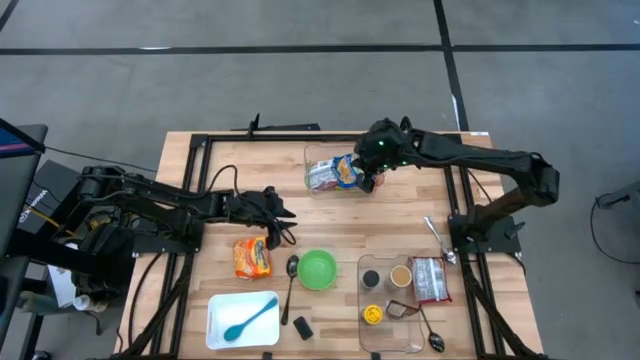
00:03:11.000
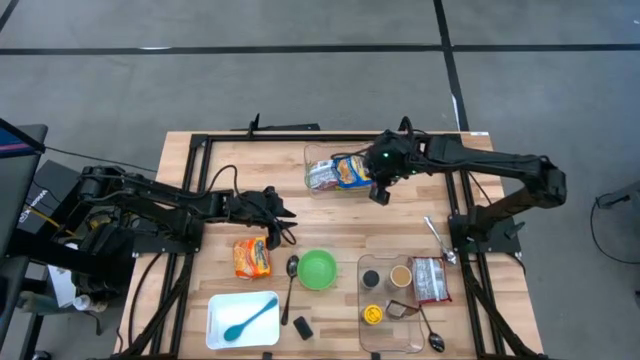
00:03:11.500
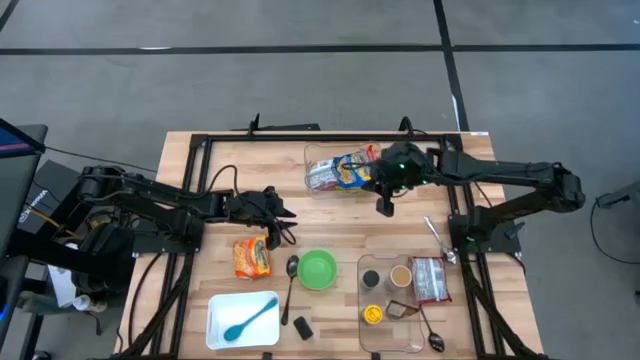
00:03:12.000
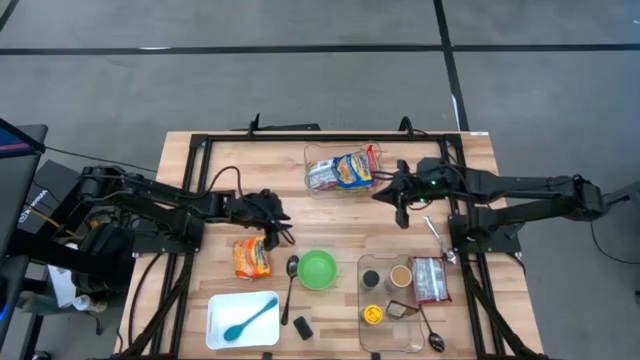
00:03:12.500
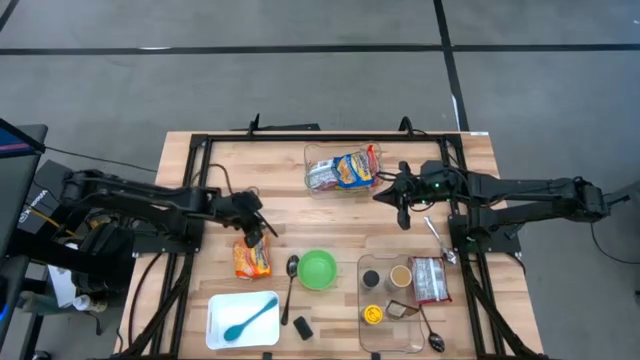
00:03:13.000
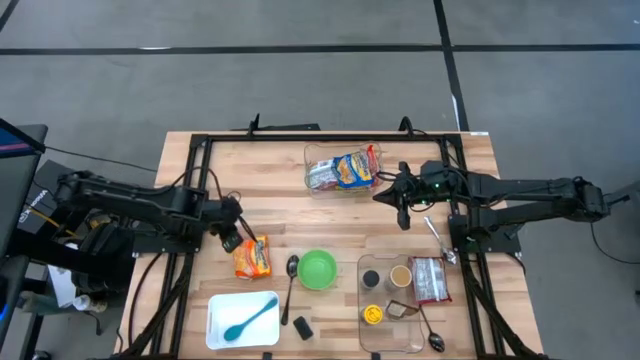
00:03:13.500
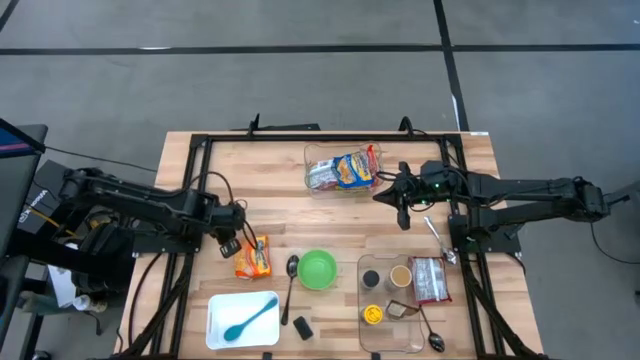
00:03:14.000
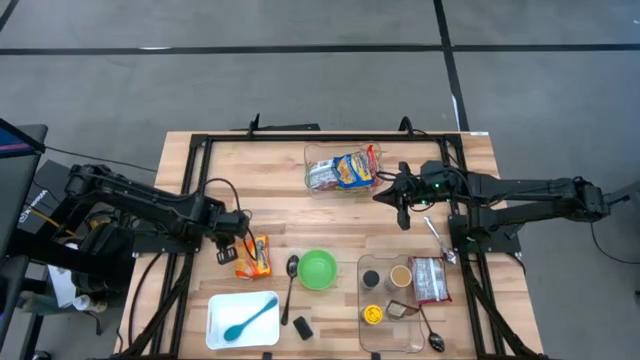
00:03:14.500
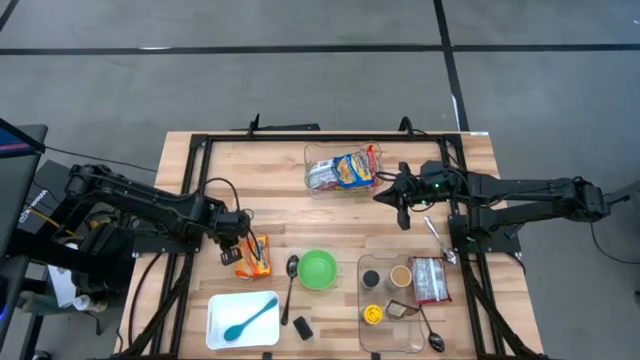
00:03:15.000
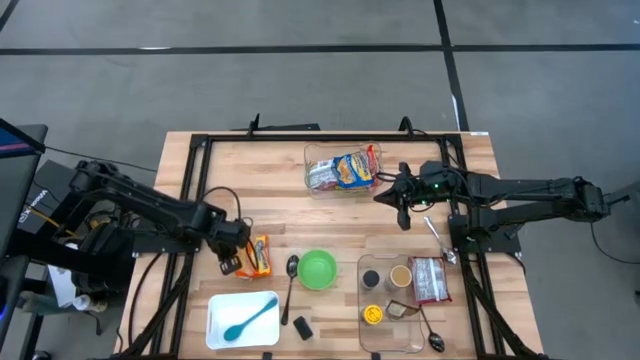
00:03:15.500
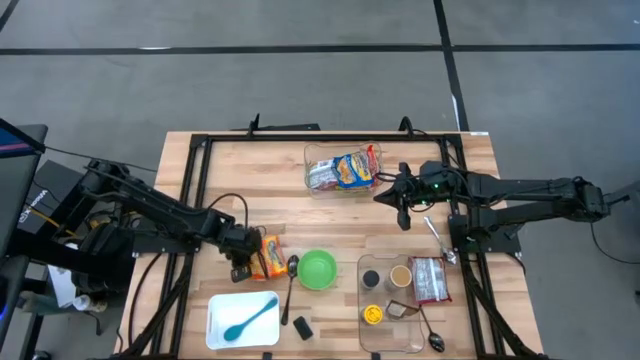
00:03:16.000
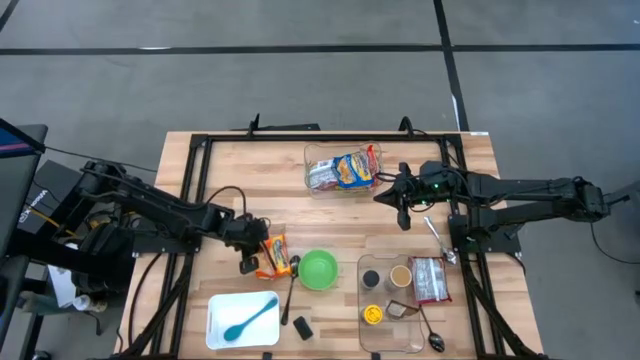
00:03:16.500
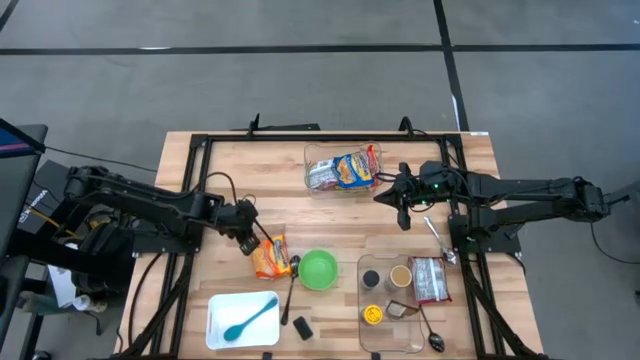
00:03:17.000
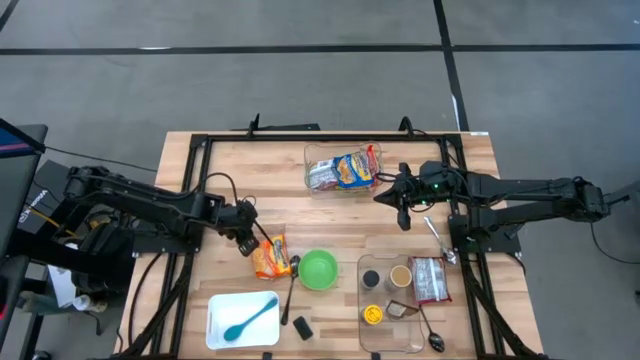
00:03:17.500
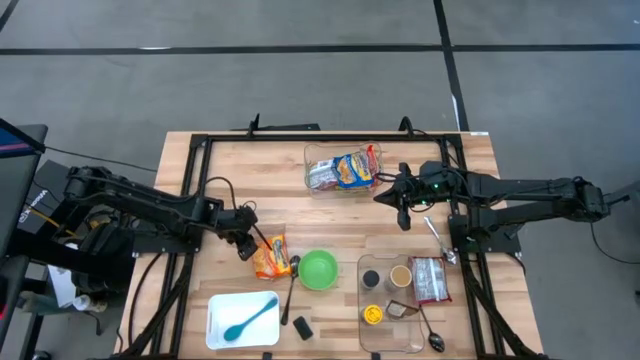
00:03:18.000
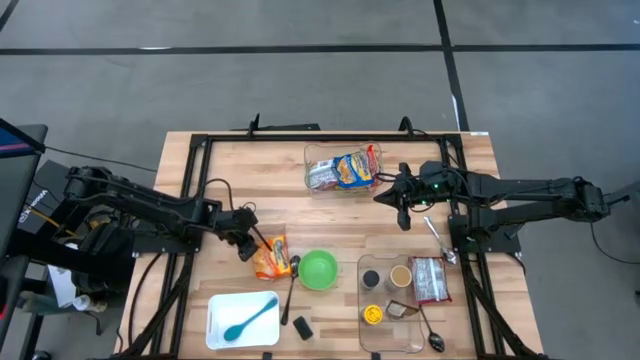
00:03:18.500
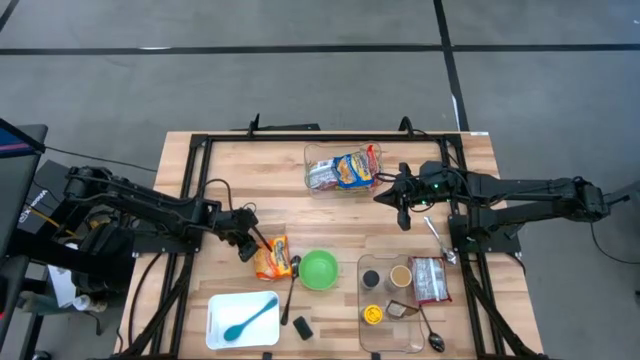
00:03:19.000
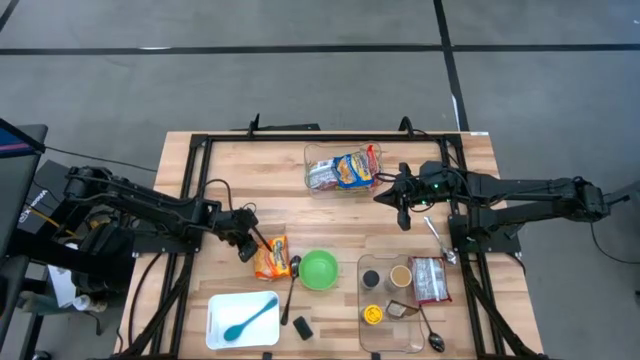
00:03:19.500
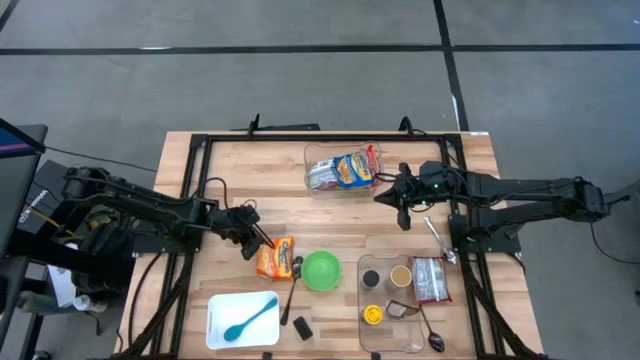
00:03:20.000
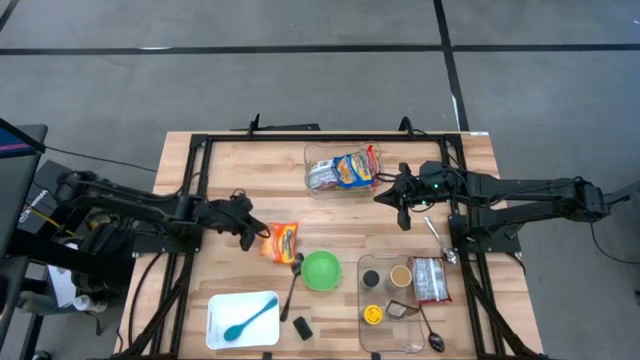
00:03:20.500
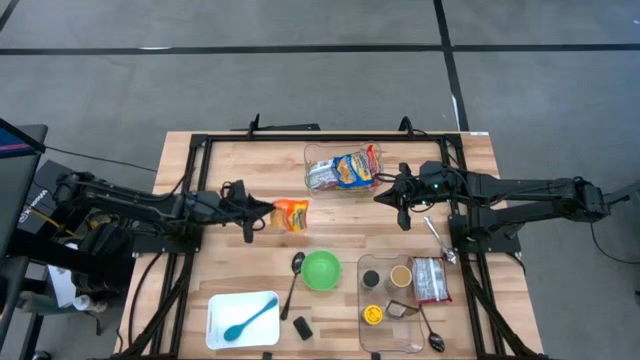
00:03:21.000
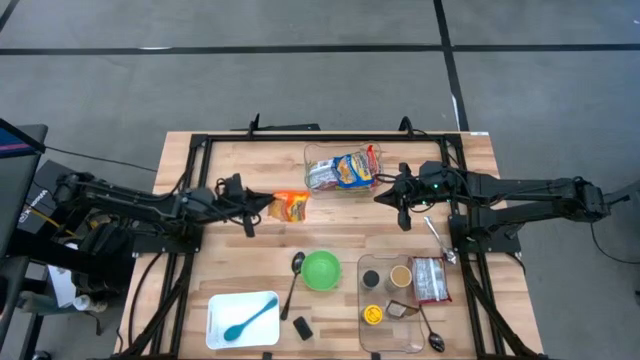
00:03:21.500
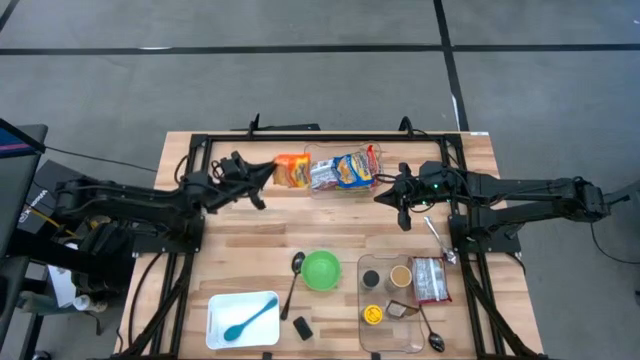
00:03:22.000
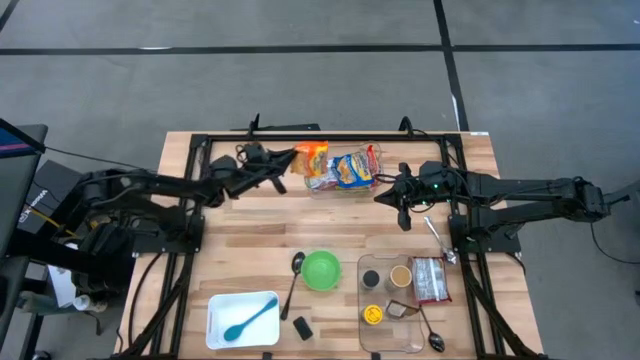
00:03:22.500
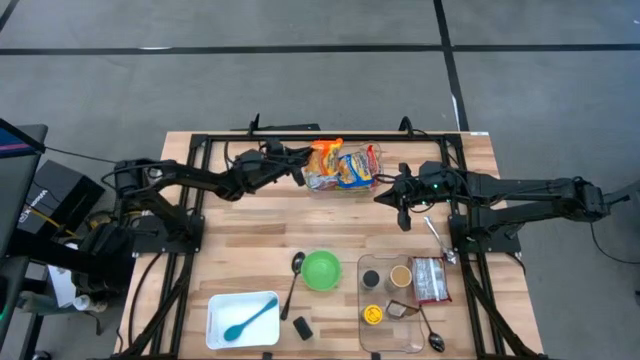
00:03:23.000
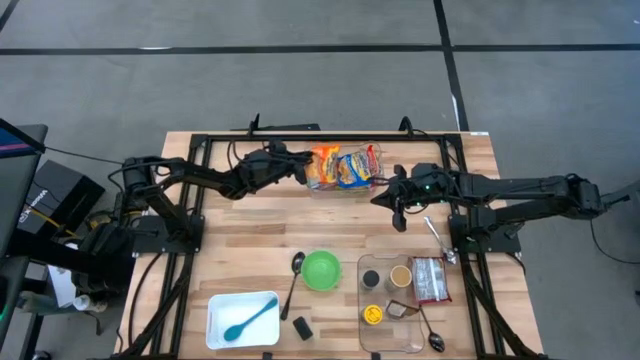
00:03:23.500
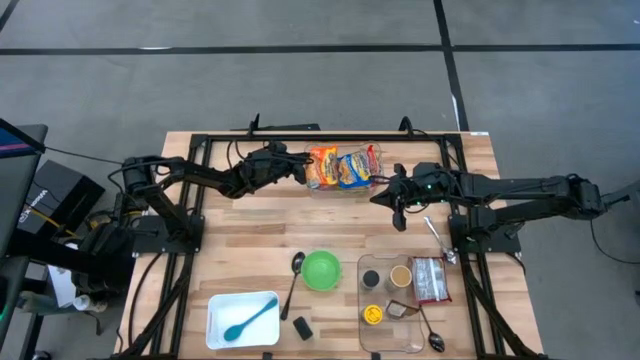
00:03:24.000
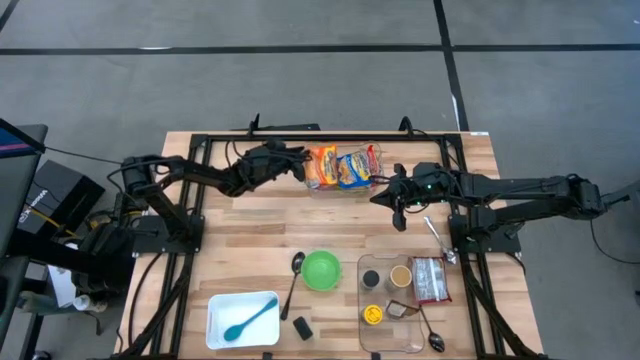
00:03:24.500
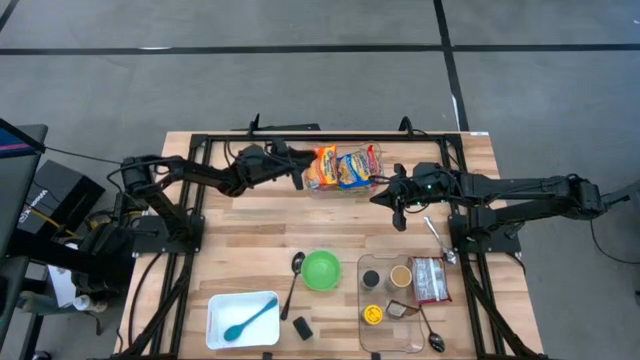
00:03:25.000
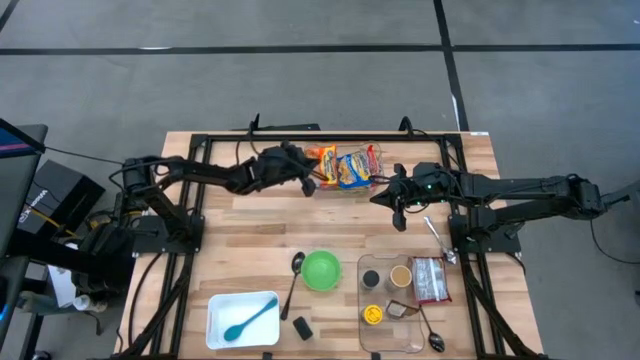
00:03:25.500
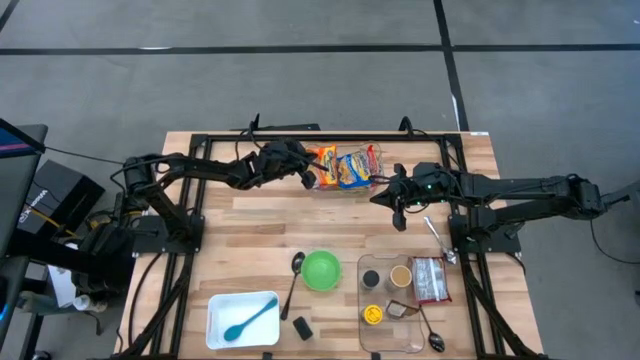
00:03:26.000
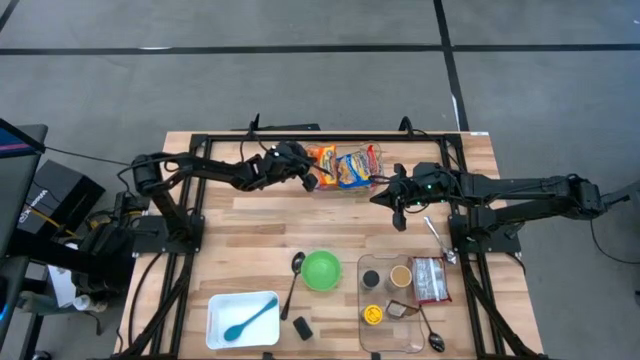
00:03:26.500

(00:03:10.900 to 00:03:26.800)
Task: Pick & Place Food Item
Put the orange noodle pack into the top transparent bin

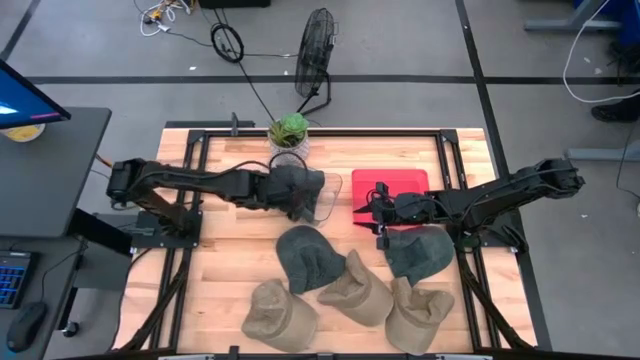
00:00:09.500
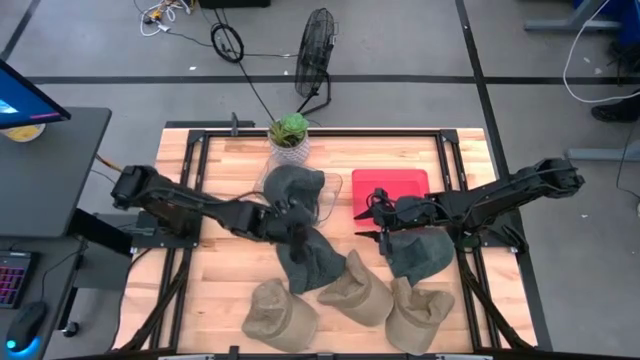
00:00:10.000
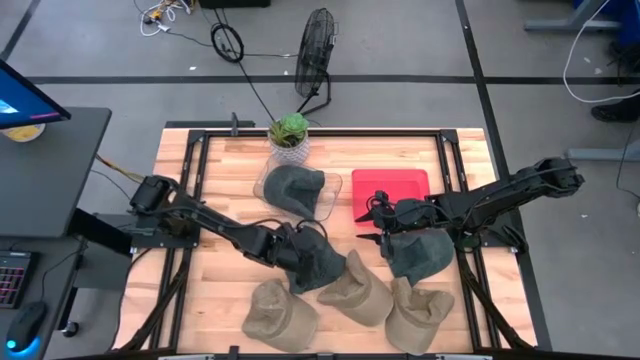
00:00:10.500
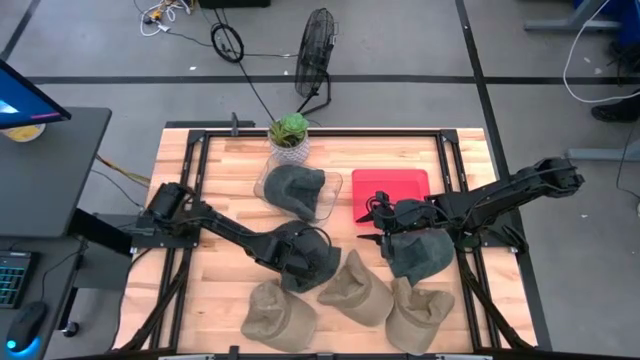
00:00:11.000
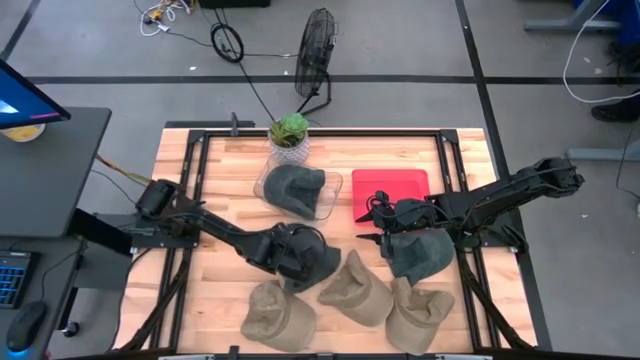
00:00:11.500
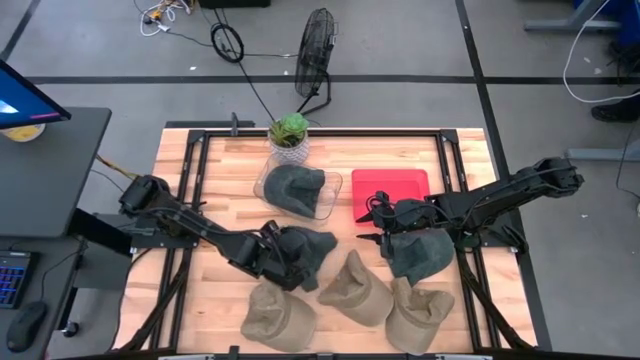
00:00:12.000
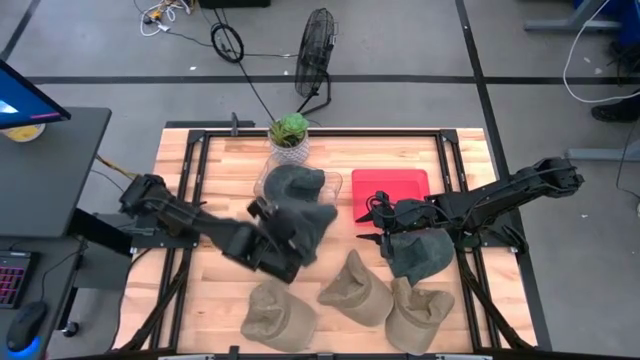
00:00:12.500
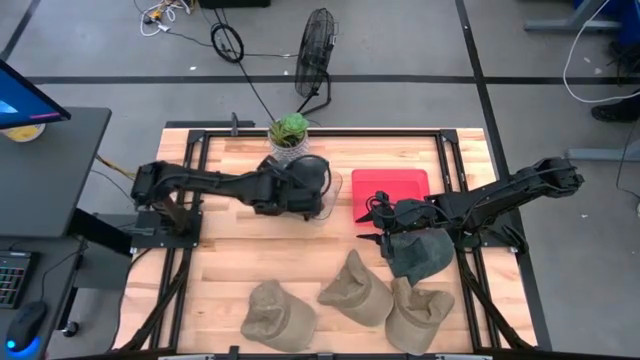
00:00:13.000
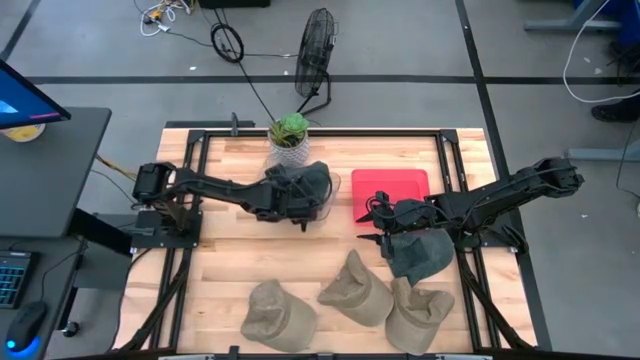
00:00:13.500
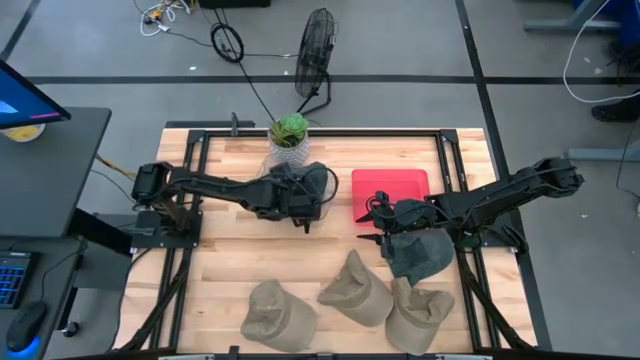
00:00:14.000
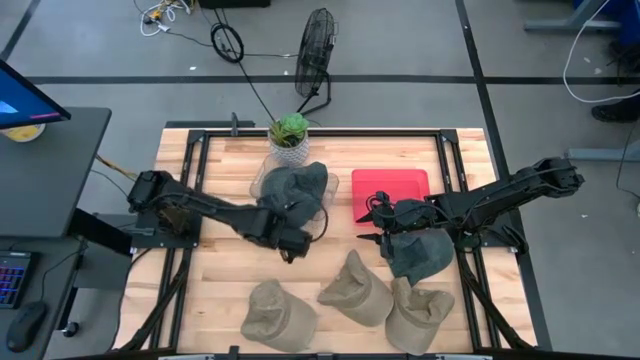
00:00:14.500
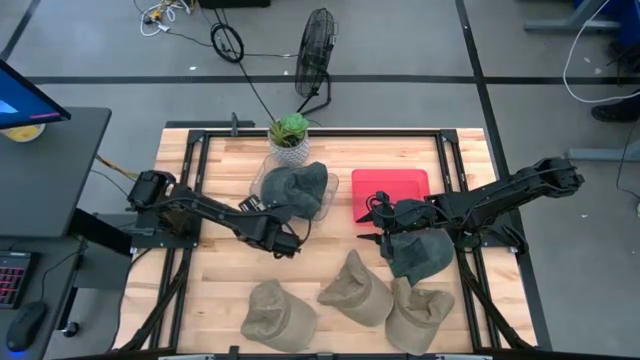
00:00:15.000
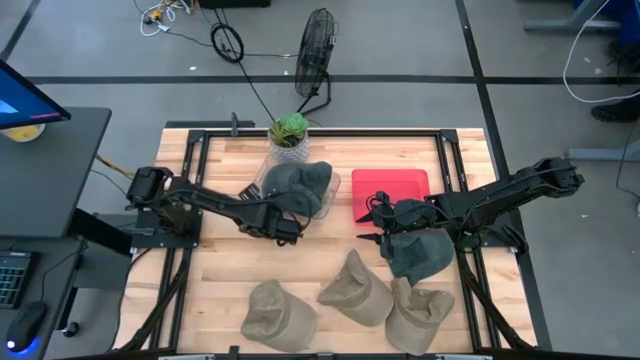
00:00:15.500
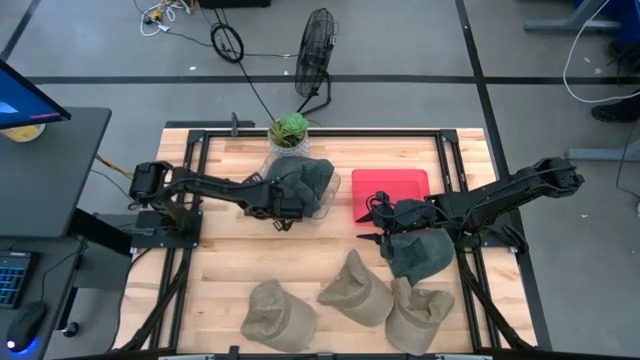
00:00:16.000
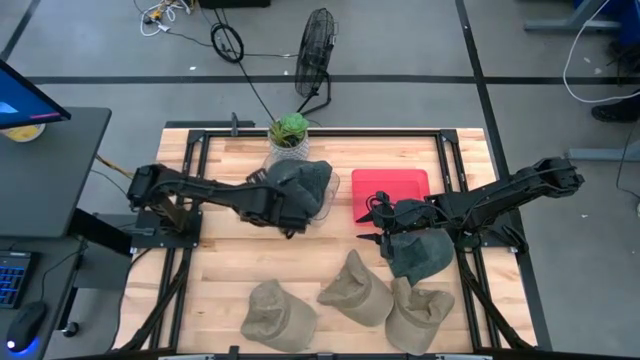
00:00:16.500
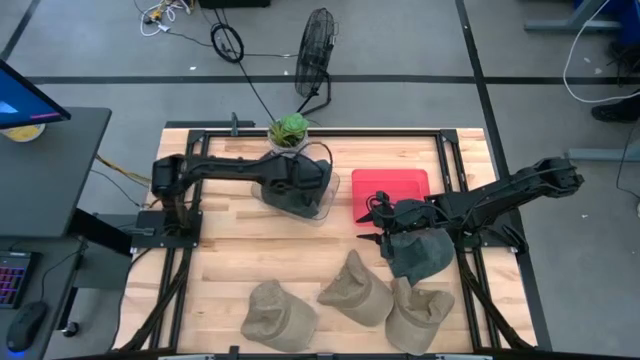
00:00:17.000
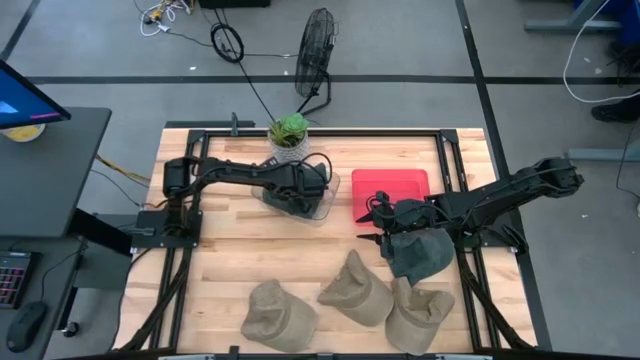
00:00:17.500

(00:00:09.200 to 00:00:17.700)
Task: Pick & Place hat
Put the left green cap into the transparent bin
